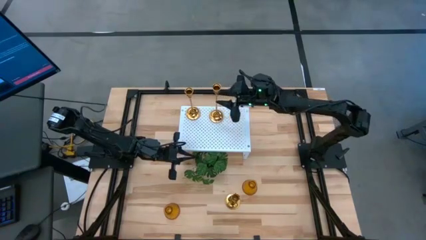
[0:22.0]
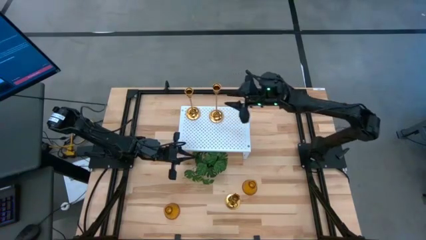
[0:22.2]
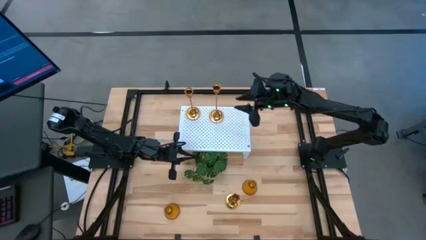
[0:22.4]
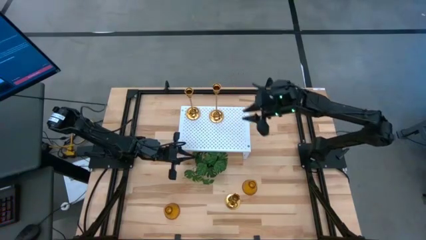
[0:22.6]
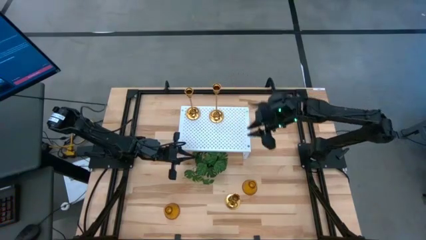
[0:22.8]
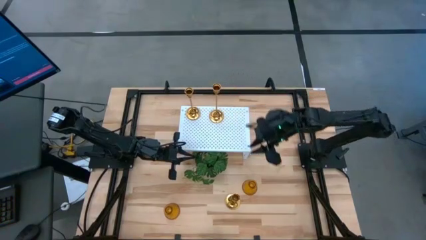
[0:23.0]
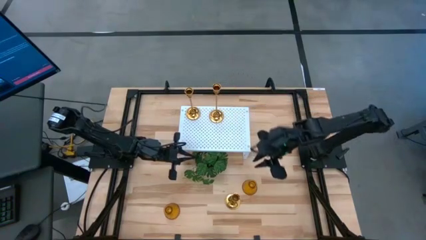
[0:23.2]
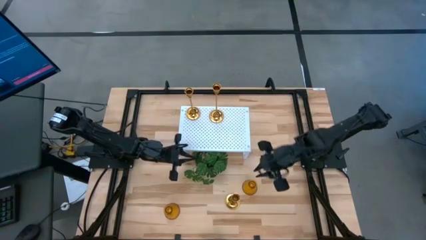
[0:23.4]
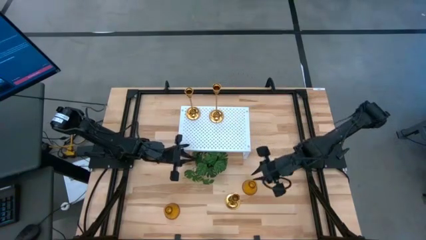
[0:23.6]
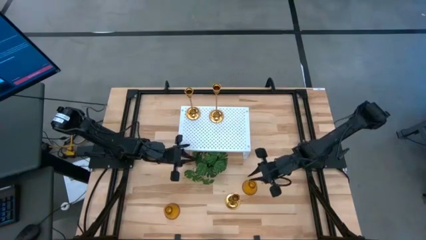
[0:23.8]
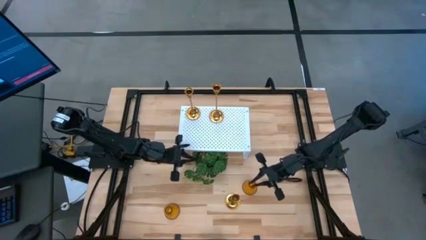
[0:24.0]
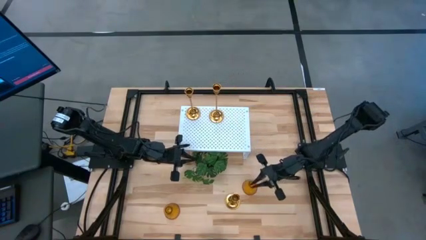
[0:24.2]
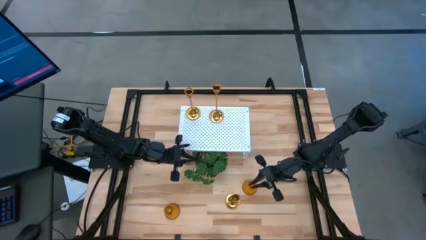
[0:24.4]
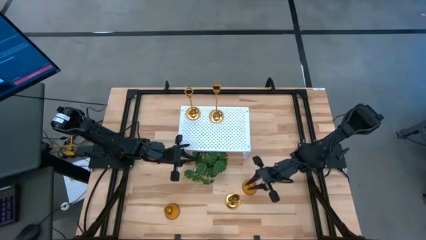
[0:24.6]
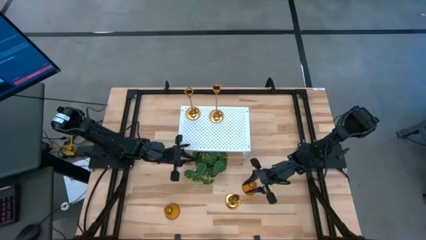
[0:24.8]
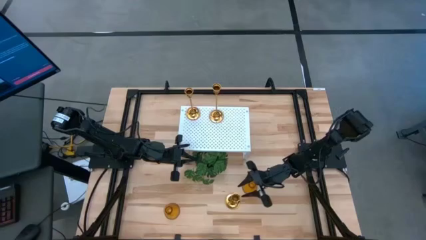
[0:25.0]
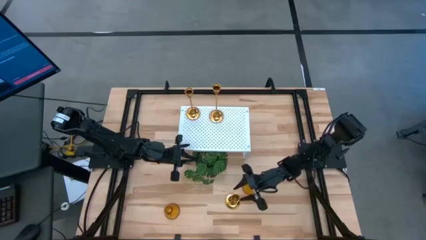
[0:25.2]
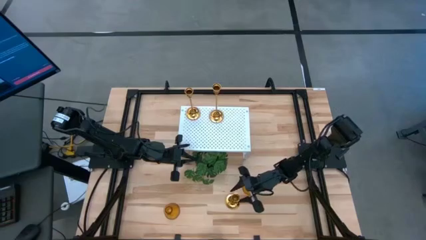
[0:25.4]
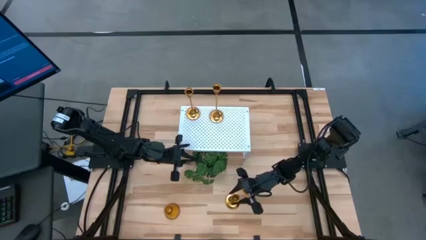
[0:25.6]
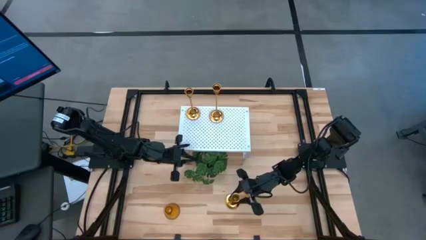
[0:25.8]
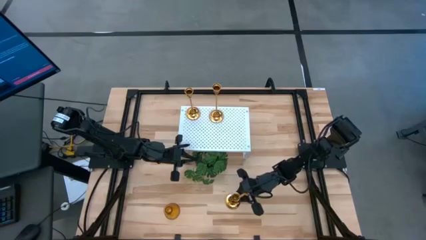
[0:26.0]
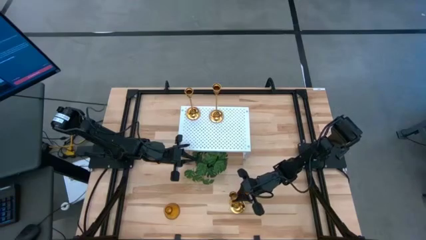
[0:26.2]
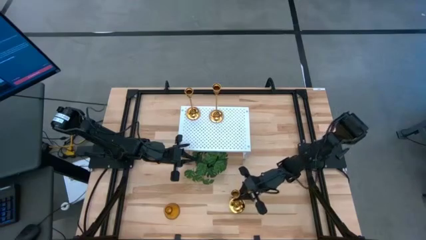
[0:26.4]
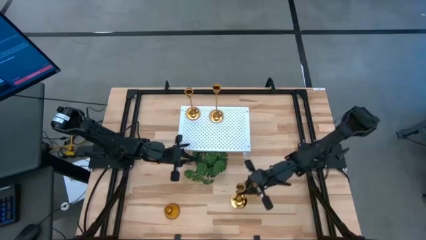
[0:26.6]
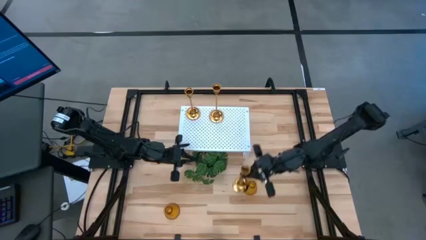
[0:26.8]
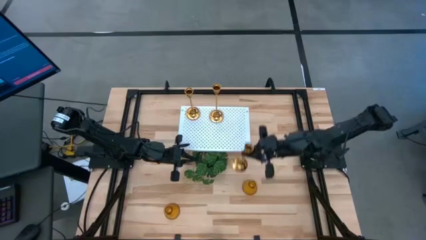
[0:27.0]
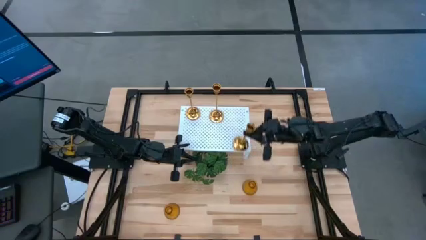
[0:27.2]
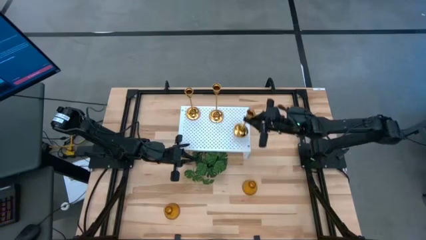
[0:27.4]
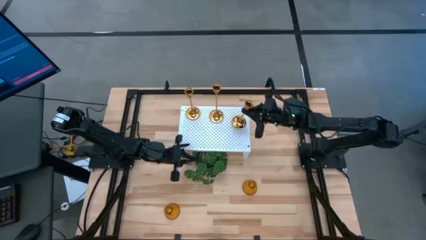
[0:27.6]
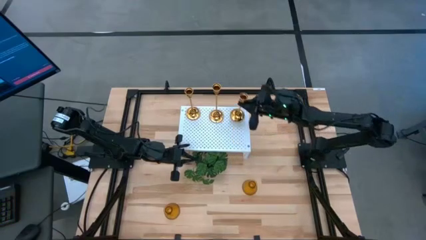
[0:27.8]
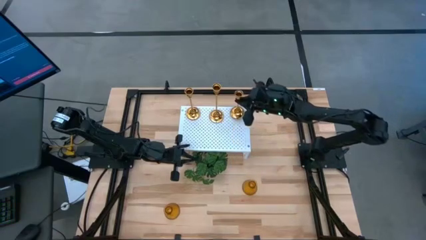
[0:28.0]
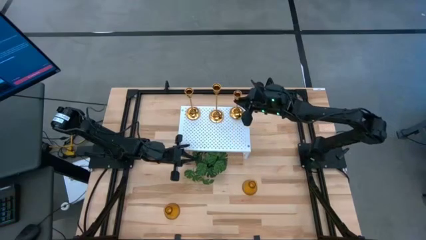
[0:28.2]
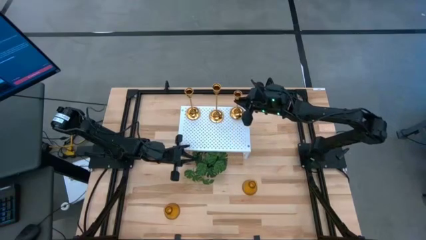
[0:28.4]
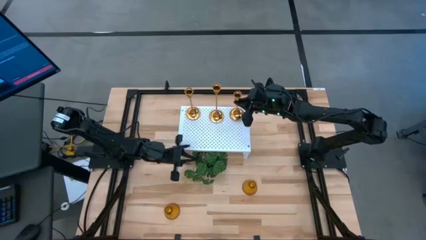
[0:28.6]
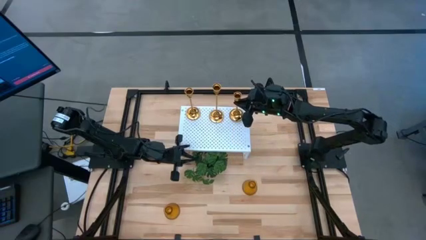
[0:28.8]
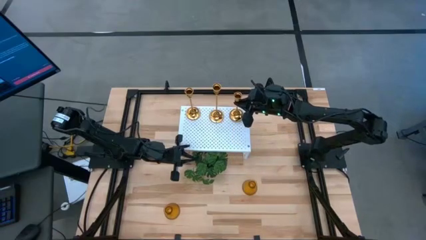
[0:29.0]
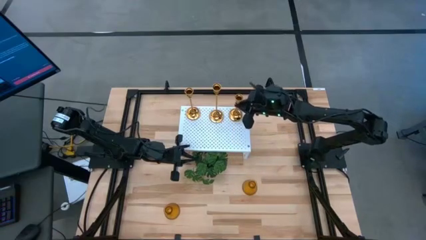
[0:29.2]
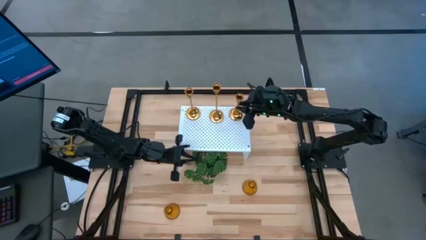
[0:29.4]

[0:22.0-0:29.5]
Task: Pick & Place candle stick holders
Put the gold candle holder on the shelf

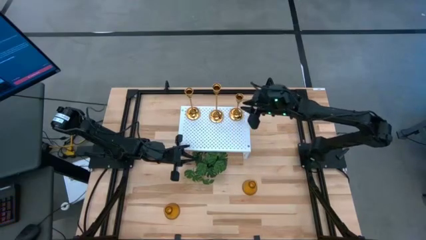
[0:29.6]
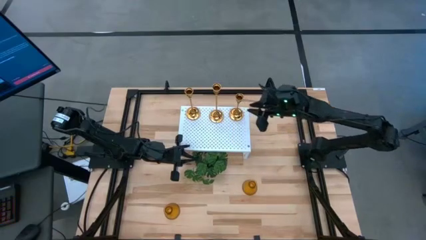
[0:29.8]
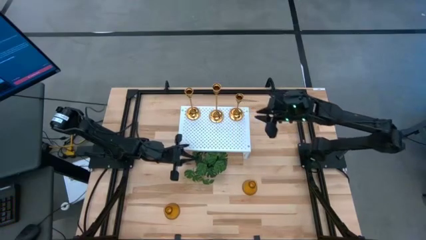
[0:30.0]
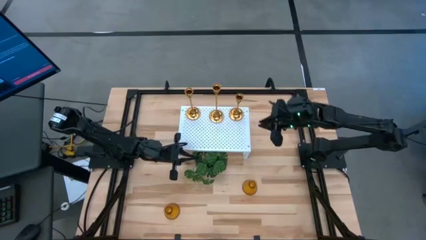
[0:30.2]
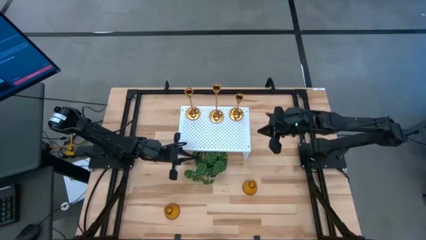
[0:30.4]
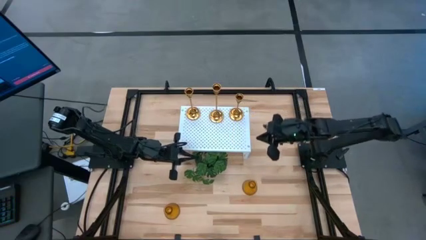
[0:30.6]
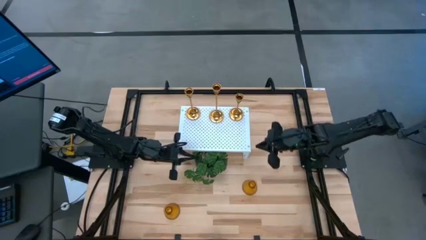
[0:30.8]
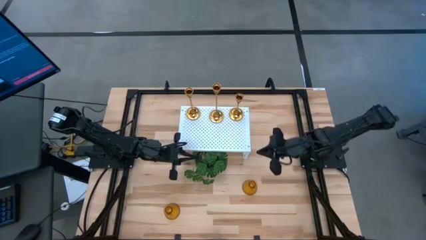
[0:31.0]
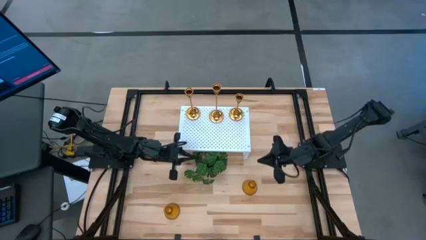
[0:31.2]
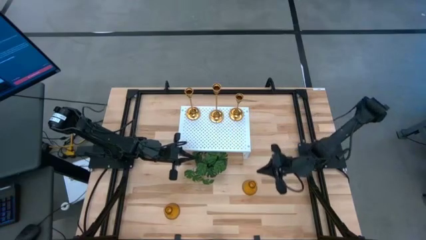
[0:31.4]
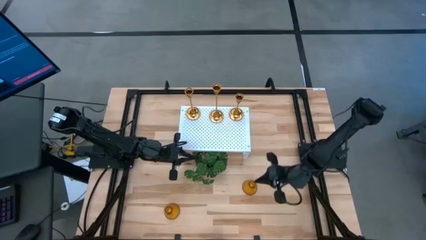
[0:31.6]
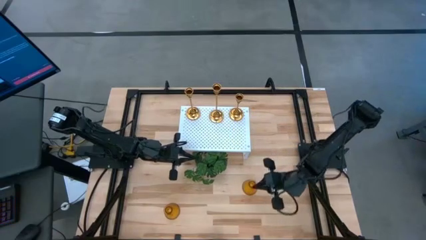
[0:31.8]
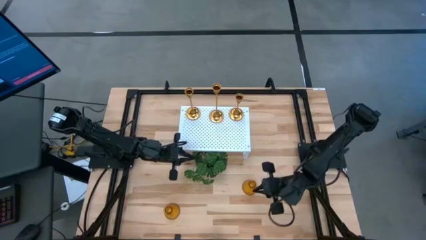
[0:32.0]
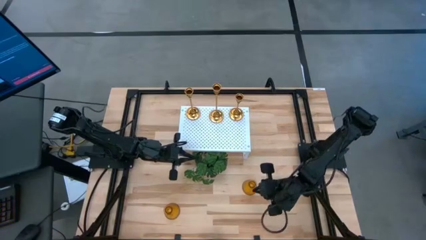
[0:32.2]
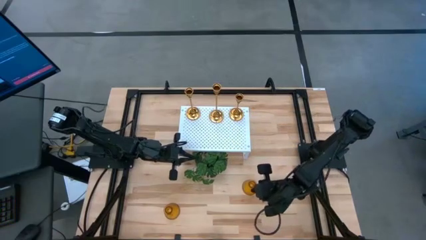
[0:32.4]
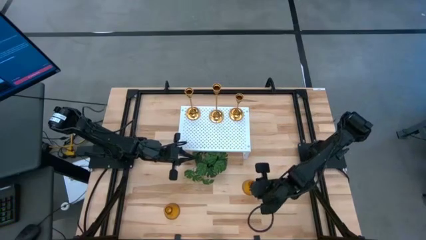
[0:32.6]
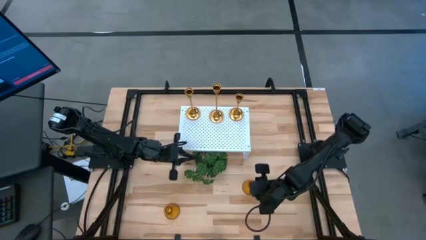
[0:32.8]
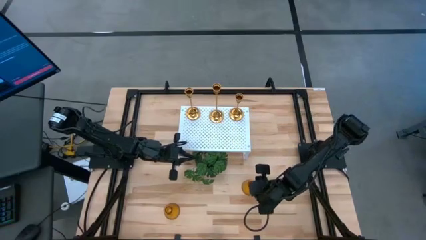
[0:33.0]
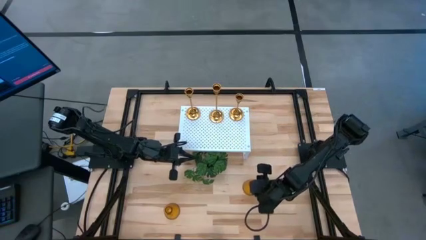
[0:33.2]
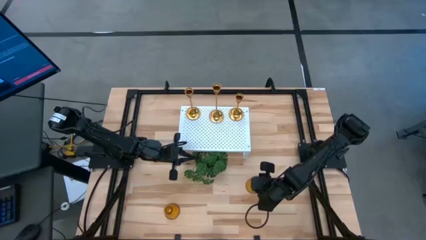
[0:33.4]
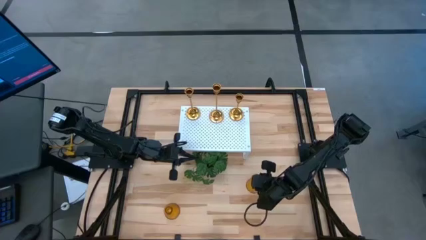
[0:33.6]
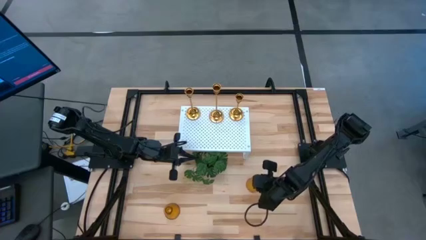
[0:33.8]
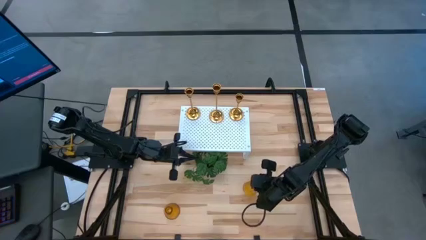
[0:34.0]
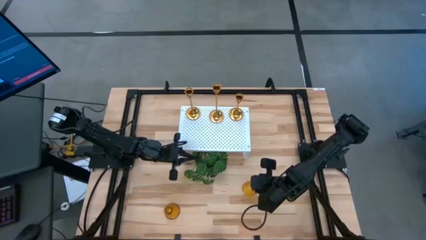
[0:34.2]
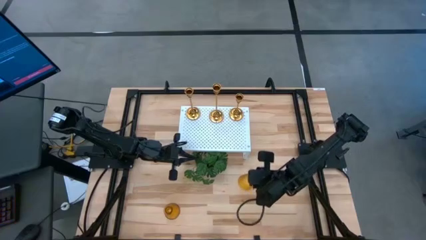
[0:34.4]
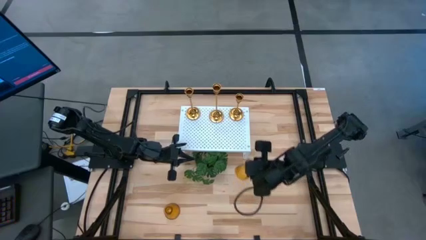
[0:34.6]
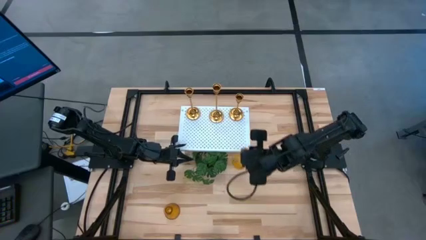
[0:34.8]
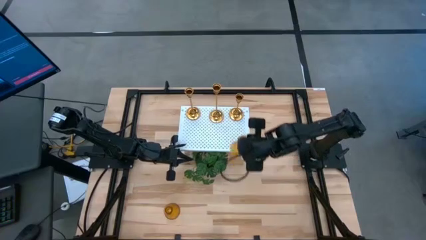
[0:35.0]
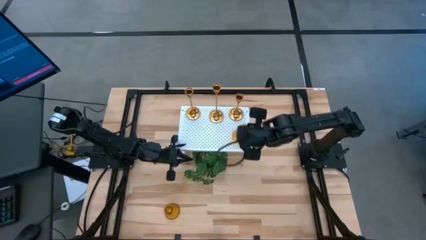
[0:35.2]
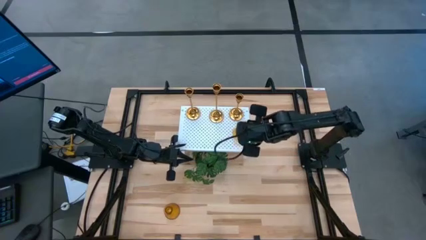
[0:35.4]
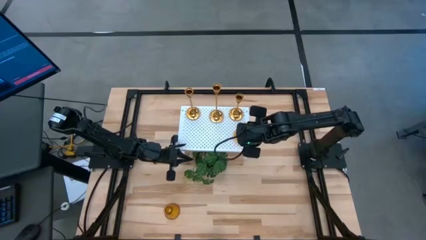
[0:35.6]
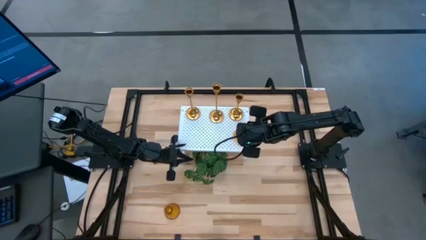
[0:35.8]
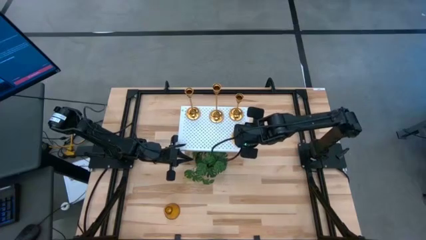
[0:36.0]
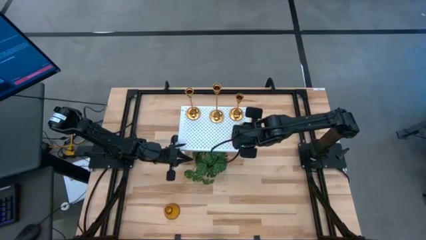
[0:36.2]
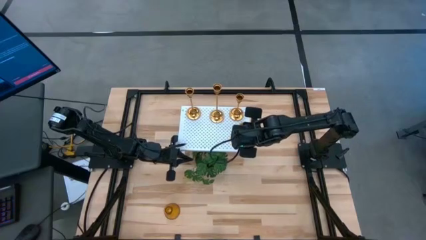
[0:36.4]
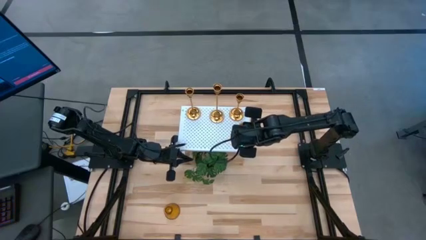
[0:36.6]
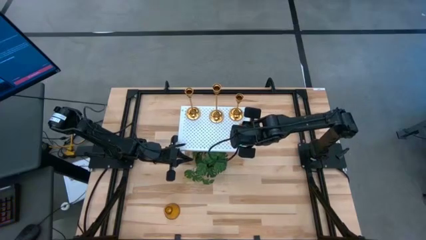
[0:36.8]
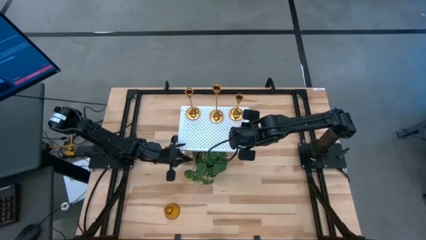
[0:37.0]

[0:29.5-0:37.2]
Put the right orange candle holder on the shelf

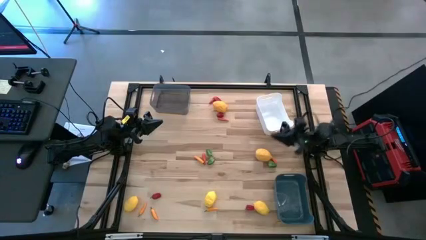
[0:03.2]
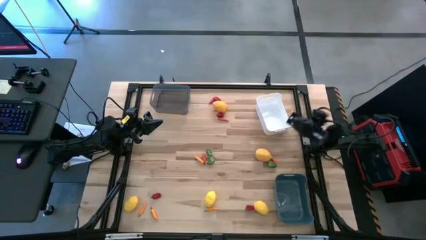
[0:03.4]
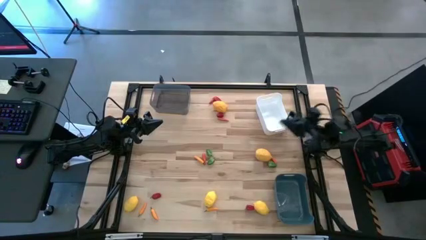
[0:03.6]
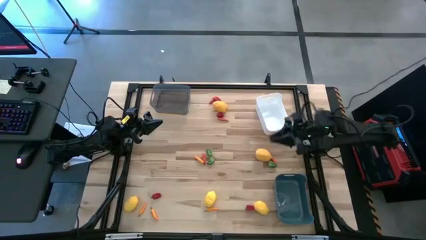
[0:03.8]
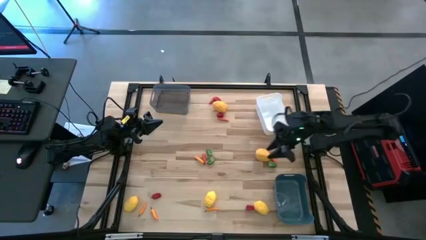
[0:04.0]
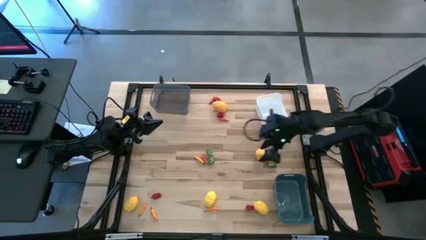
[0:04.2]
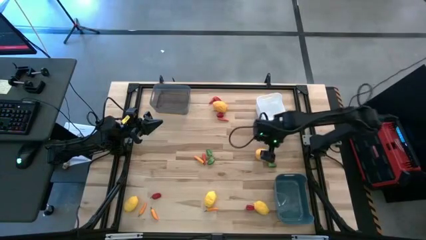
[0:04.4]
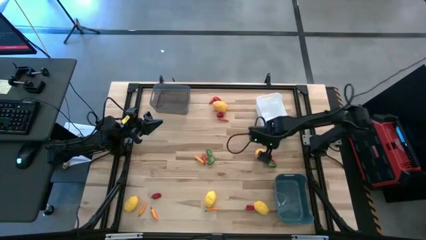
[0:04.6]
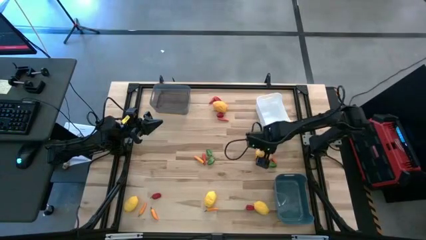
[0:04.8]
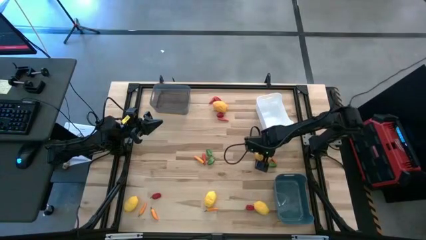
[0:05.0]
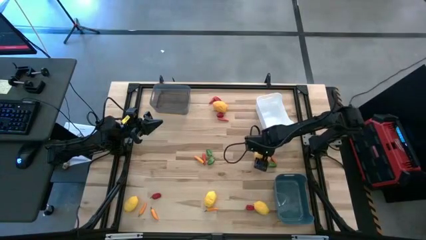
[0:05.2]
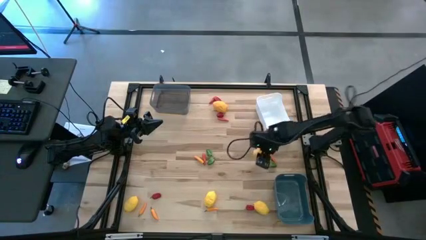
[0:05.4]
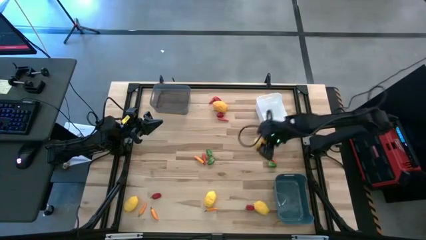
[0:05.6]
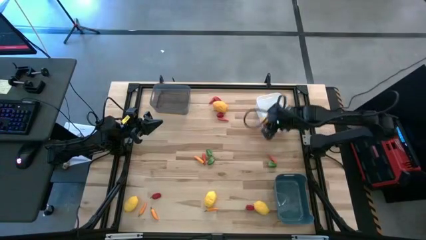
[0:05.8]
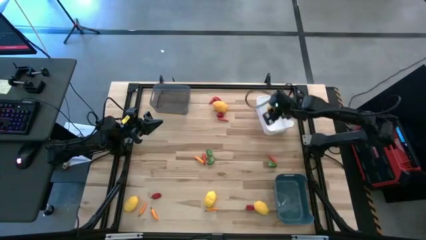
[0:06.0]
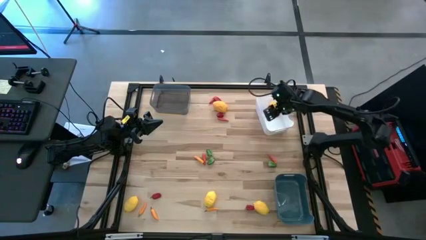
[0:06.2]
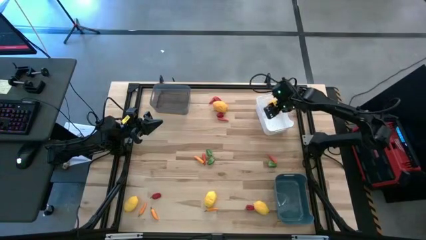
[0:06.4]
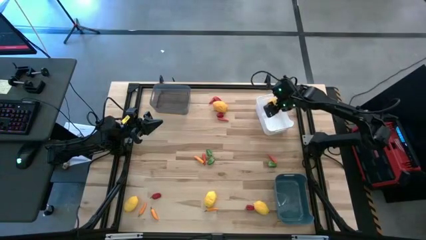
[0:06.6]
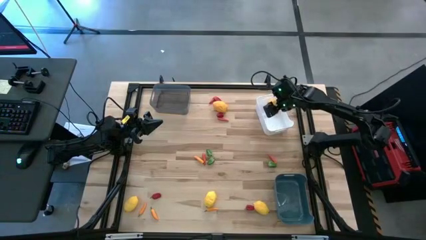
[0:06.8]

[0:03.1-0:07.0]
Task: Sort produce into baskets
Put the lemon into the white bin
